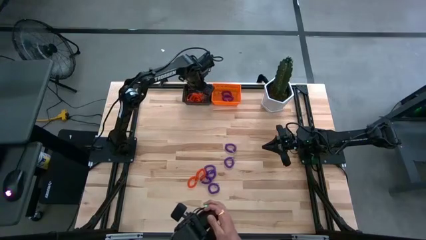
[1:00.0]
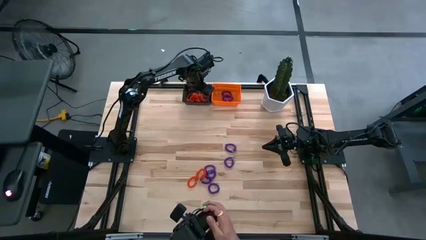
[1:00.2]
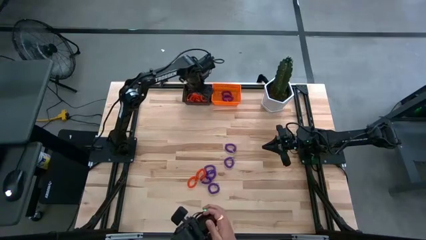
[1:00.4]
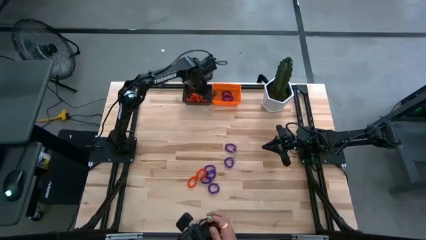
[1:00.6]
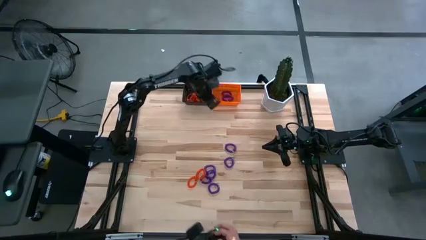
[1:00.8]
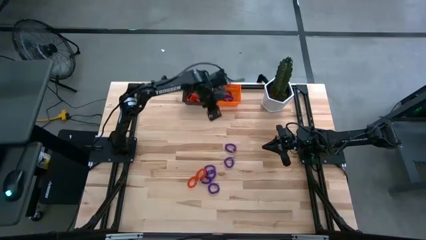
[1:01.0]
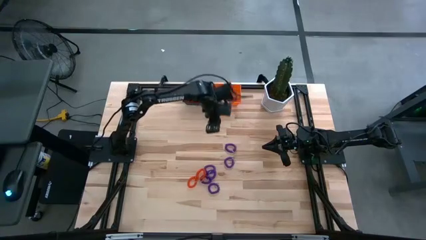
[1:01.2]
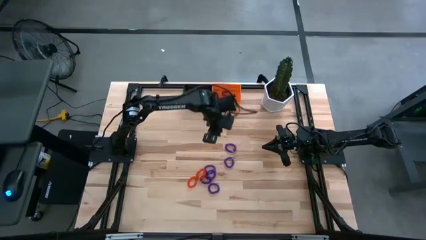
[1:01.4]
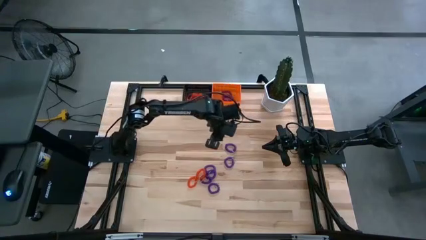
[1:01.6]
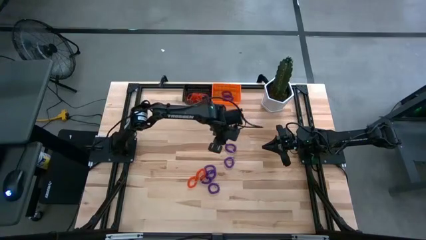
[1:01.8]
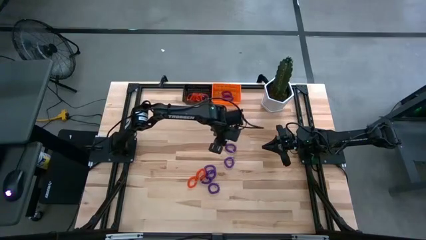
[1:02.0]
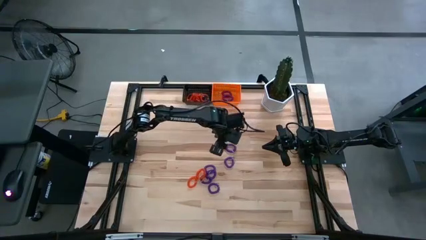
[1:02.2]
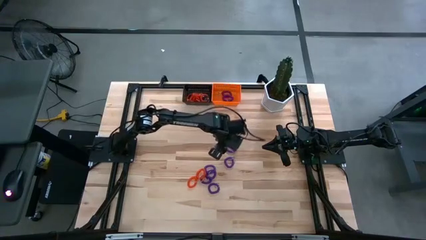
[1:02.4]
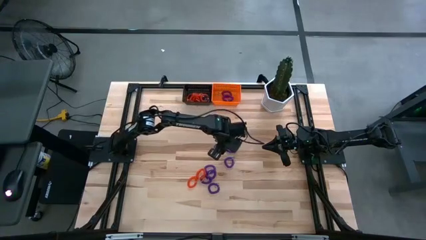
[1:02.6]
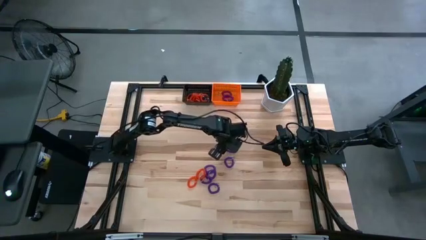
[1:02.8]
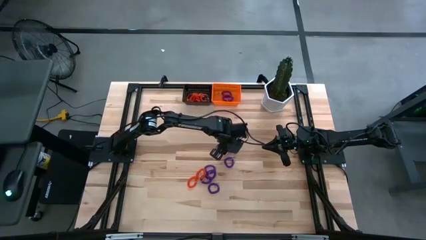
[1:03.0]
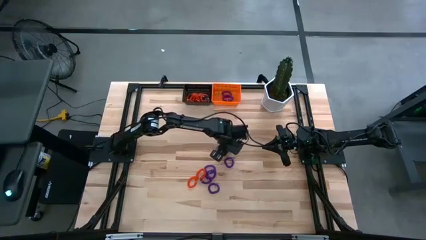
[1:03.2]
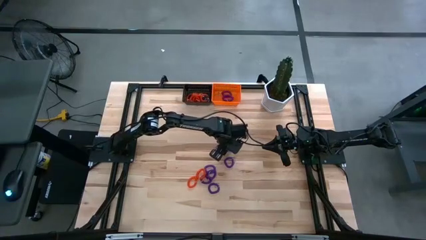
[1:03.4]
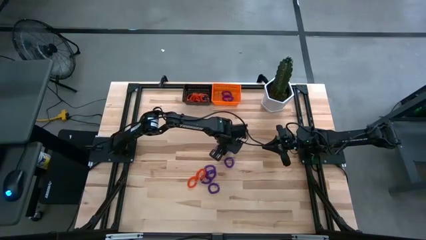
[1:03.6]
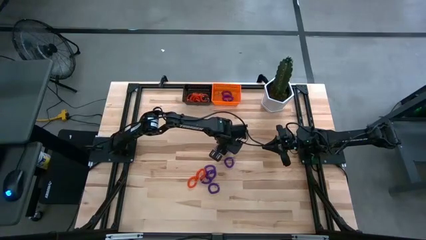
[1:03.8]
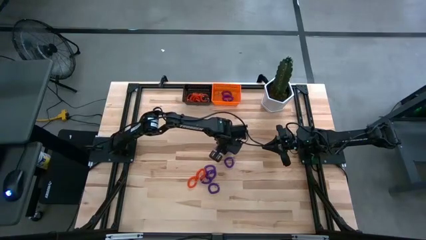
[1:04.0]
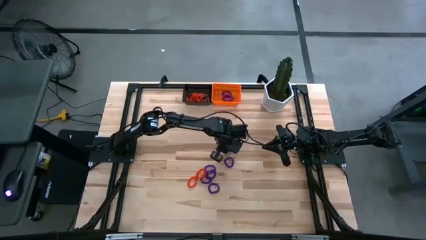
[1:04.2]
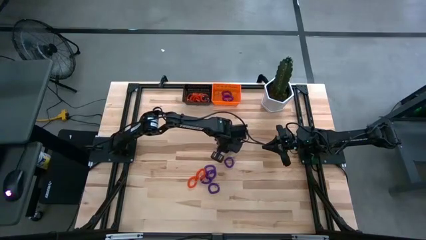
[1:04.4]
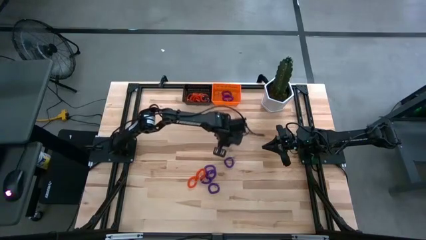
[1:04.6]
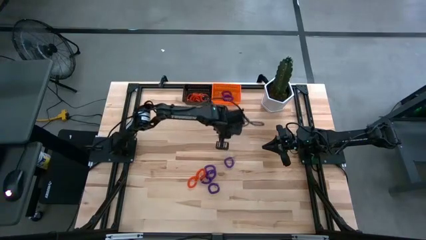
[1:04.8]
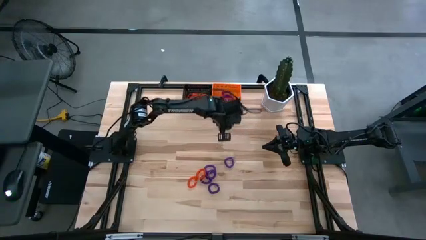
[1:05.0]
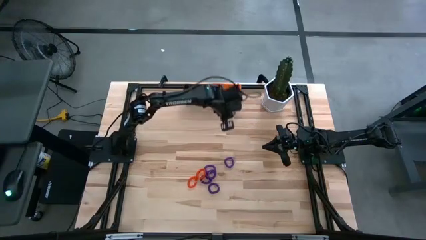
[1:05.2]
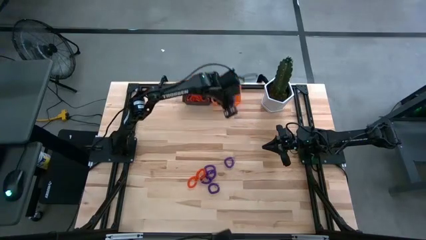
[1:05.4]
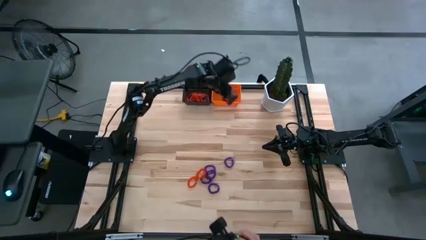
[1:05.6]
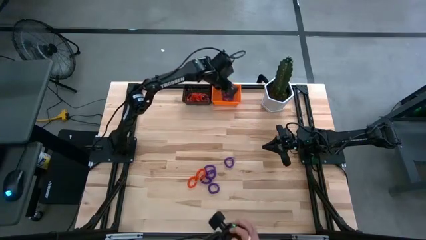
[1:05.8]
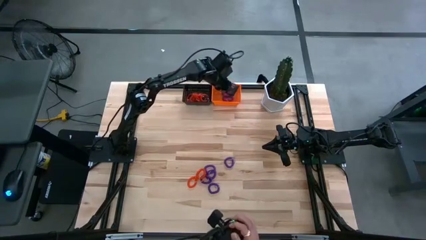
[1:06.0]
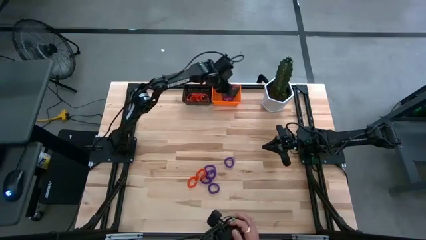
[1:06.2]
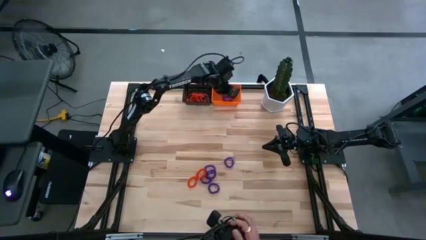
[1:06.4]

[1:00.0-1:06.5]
Task: Sort spring keychains into baskets
Put the violet spring keychain into the orange basket

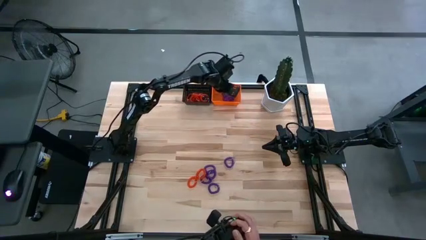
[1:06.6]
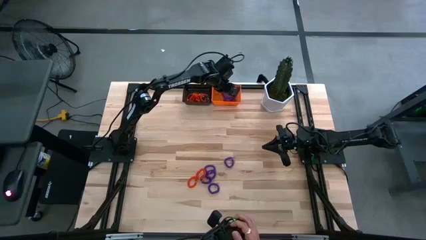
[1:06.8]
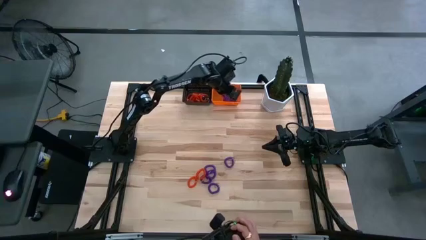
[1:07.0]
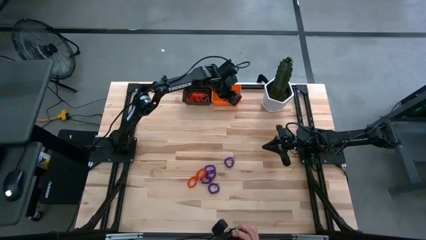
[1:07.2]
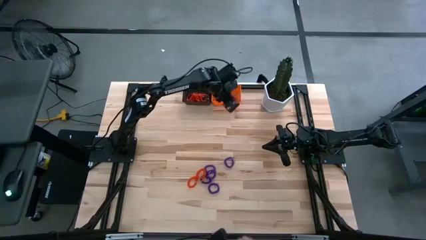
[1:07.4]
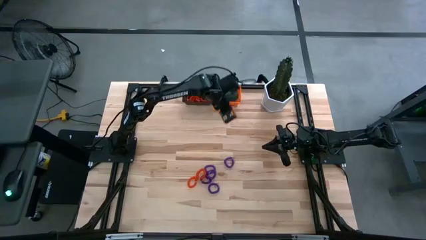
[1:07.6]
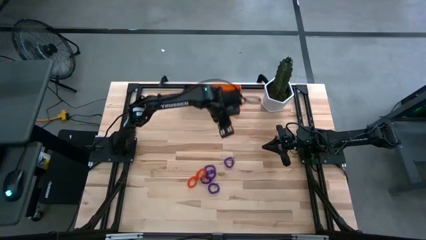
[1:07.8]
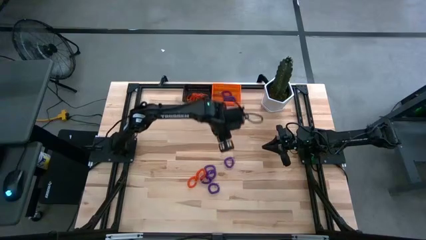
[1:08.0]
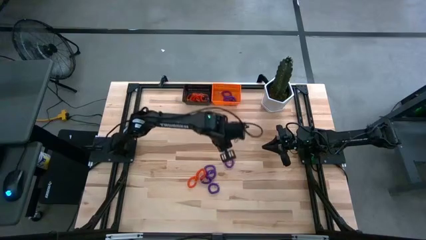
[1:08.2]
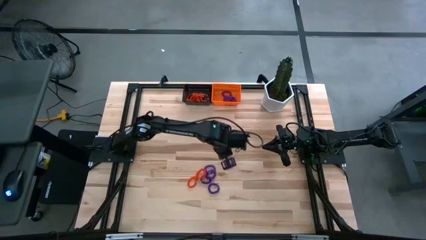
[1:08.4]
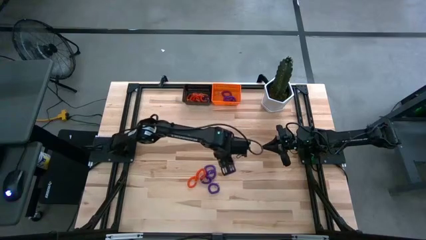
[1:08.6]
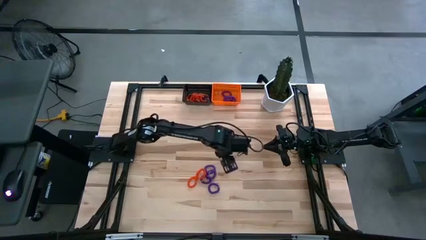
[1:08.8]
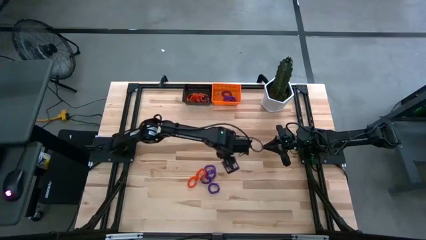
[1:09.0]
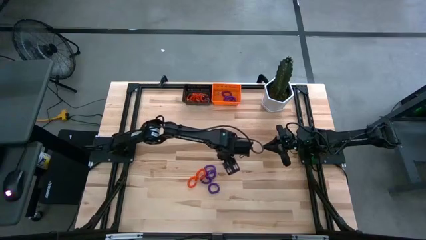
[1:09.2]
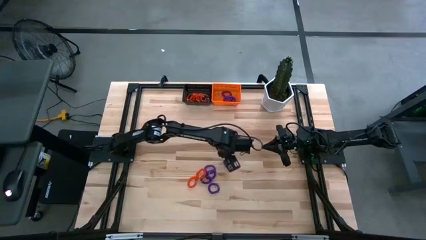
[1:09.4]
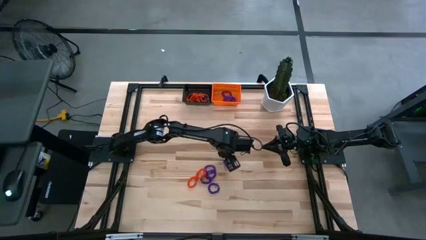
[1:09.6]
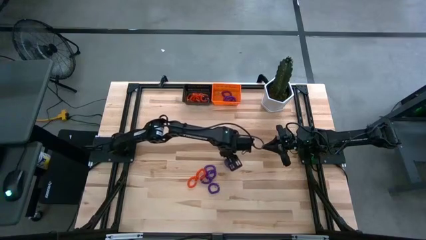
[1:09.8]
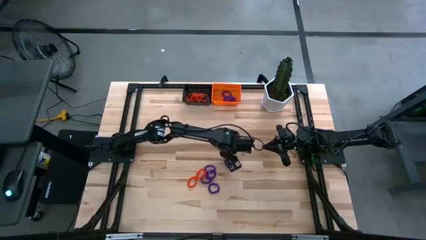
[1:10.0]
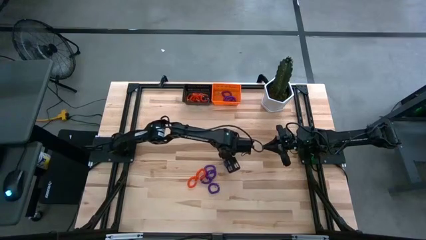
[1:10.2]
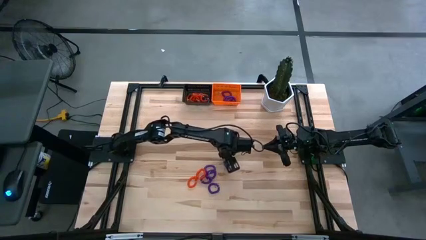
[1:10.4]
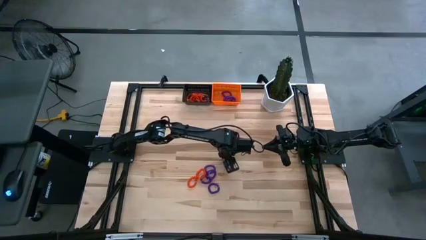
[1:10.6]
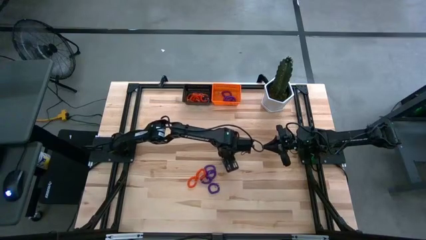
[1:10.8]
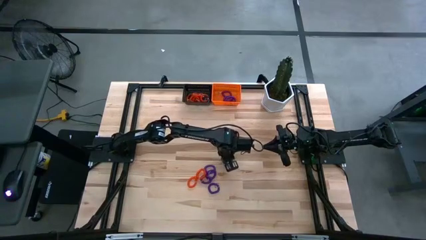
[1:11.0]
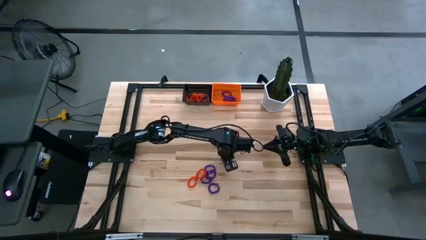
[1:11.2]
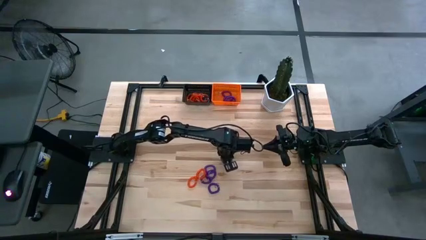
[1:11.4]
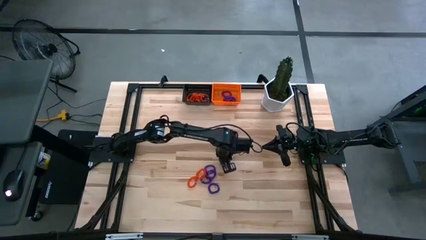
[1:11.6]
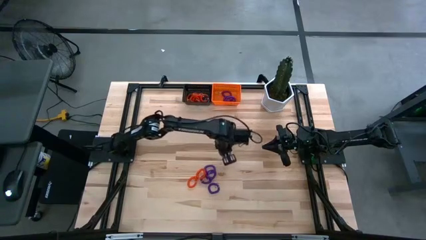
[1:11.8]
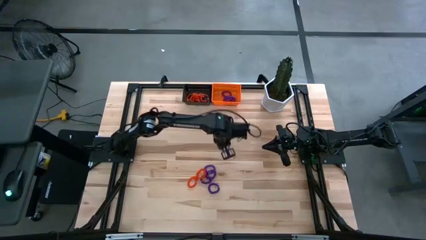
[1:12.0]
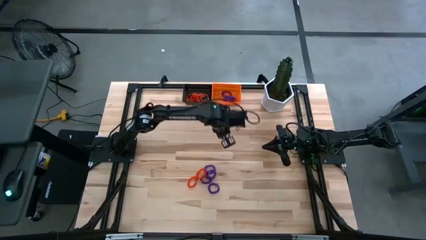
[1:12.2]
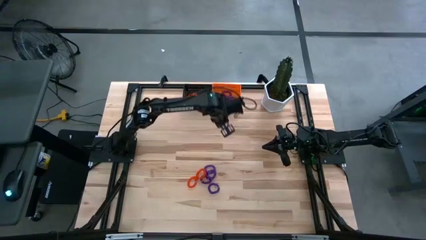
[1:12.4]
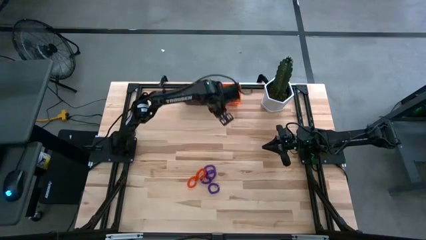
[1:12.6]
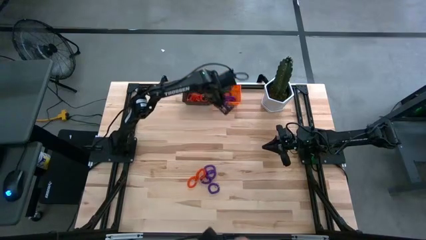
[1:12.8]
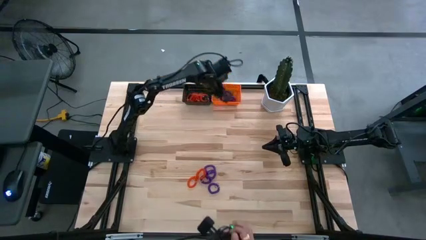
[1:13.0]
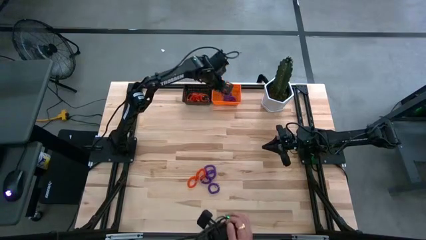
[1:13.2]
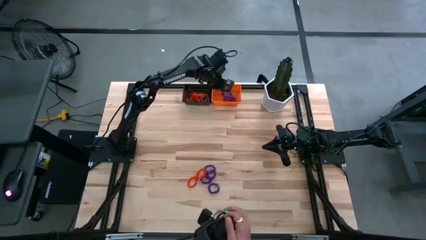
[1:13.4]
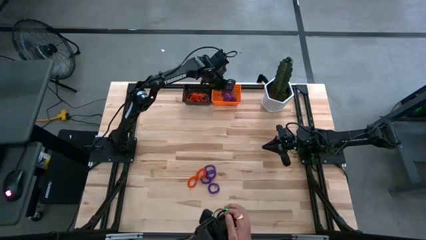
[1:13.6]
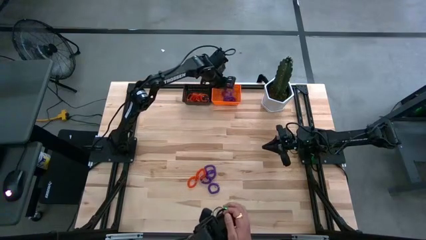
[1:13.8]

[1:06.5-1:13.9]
Put the violet spring keychain into the orange basket

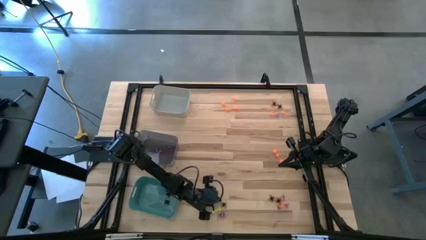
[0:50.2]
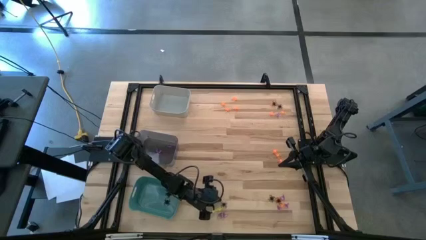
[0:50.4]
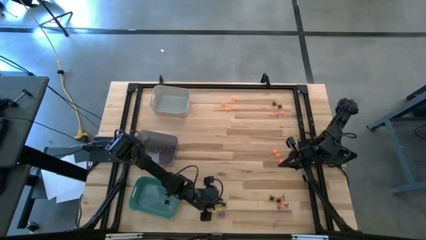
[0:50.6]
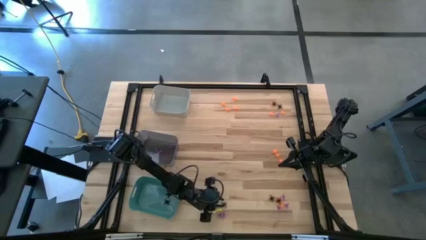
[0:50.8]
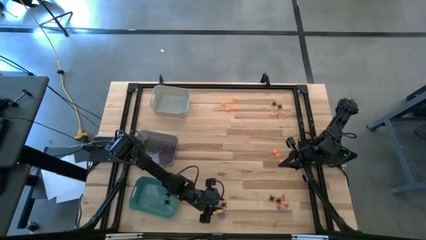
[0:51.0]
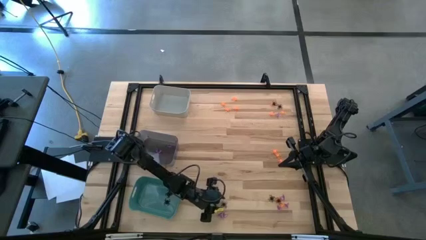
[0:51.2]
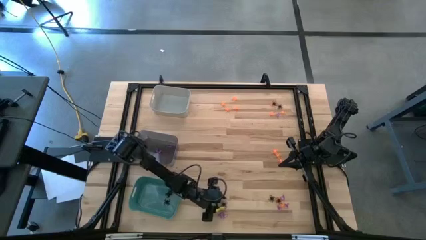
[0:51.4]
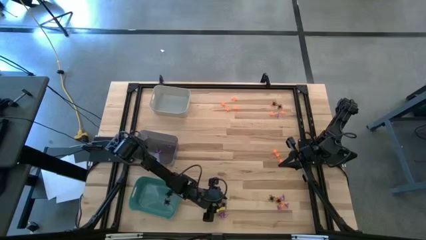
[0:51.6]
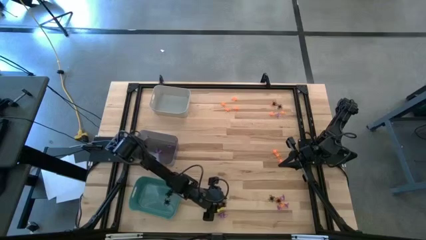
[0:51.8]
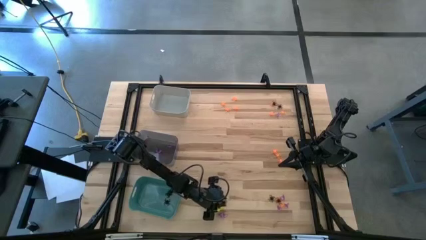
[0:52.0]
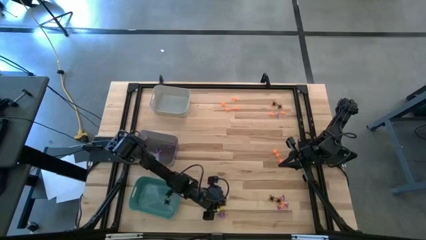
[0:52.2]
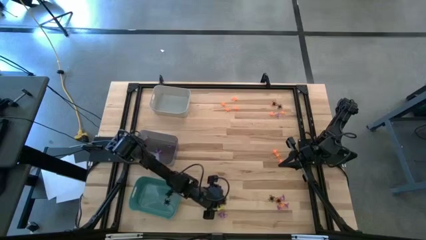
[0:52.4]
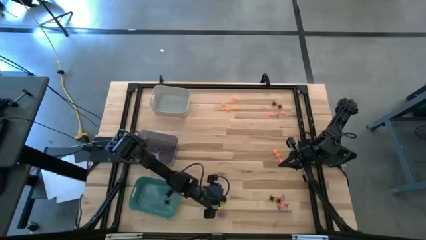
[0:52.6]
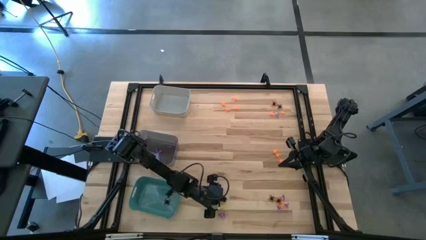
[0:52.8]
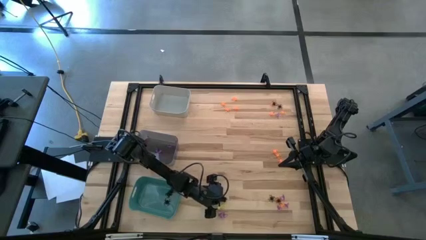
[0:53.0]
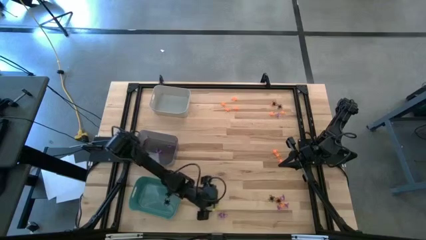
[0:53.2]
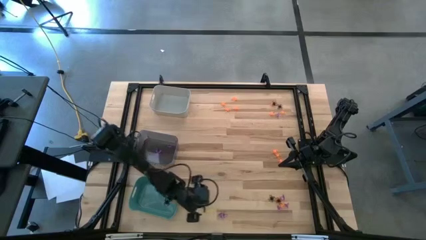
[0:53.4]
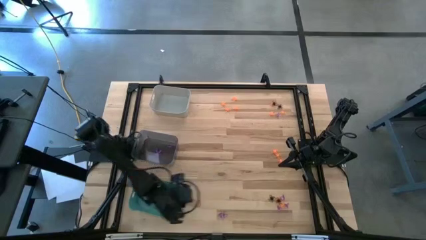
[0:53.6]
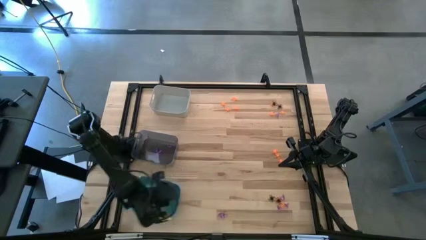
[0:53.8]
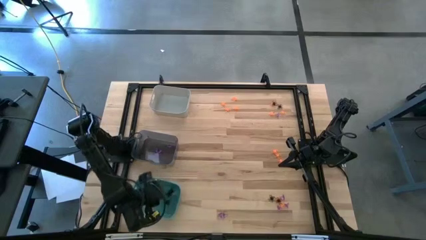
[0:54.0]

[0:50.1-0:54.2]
Task: Sort Halloween decoration
Put the bottom center black spider into the green bin
